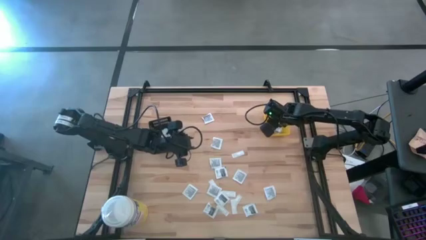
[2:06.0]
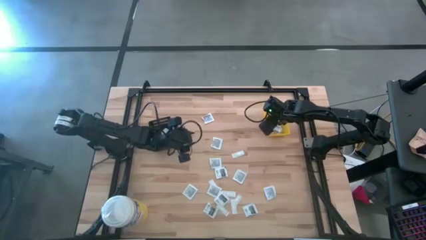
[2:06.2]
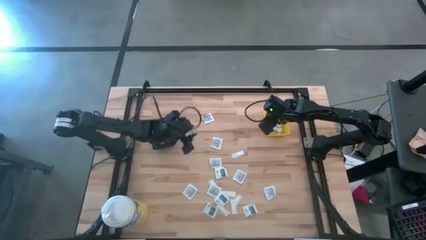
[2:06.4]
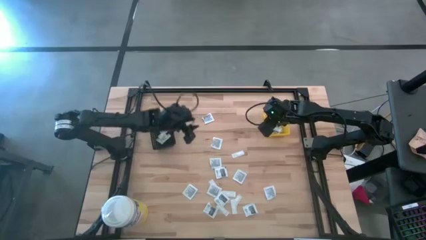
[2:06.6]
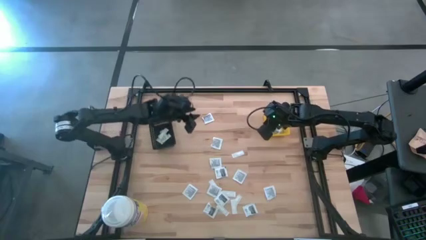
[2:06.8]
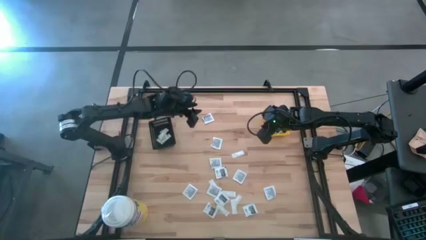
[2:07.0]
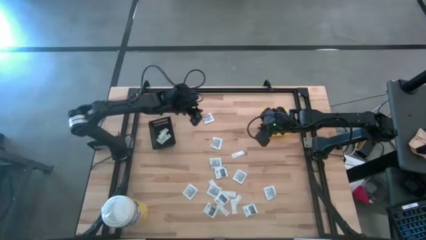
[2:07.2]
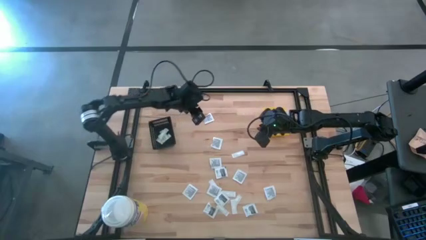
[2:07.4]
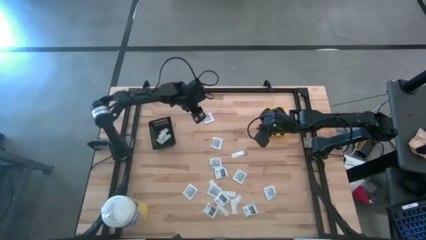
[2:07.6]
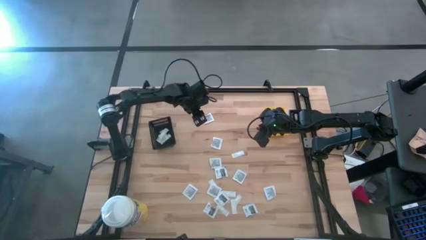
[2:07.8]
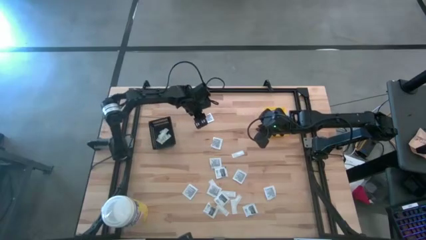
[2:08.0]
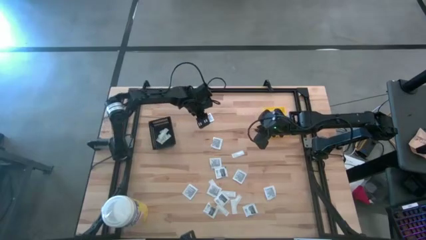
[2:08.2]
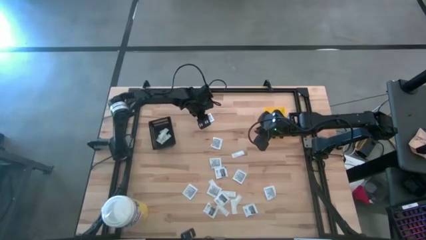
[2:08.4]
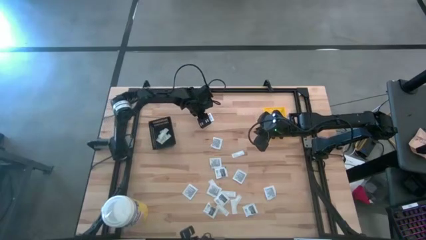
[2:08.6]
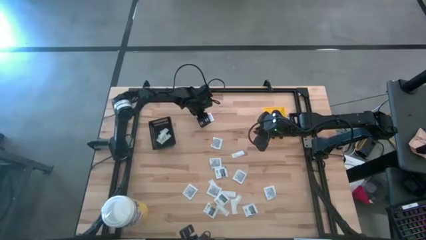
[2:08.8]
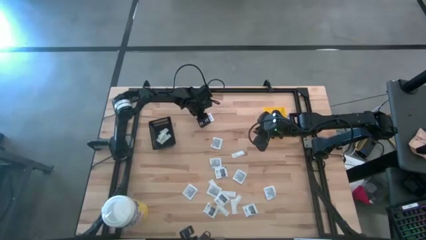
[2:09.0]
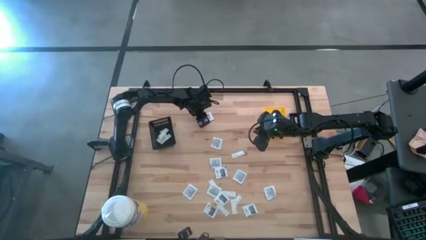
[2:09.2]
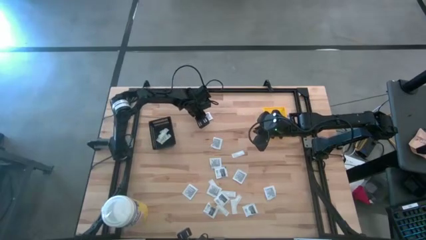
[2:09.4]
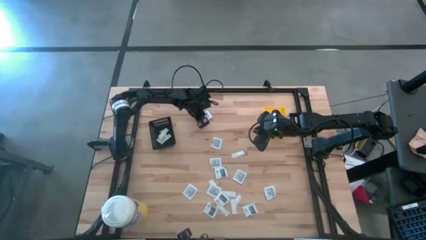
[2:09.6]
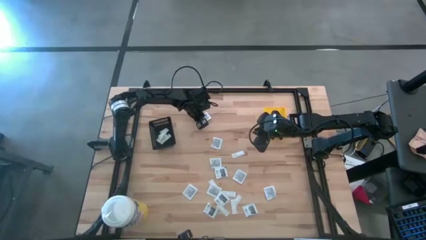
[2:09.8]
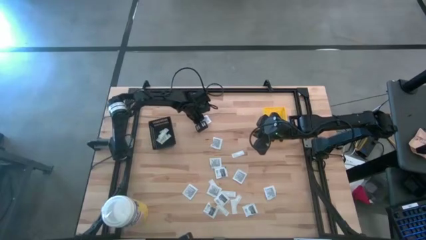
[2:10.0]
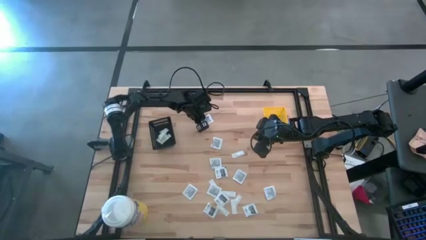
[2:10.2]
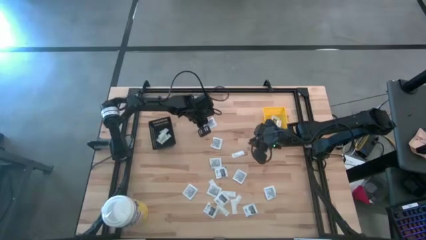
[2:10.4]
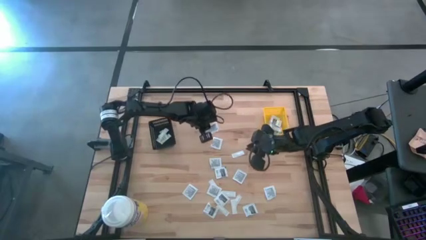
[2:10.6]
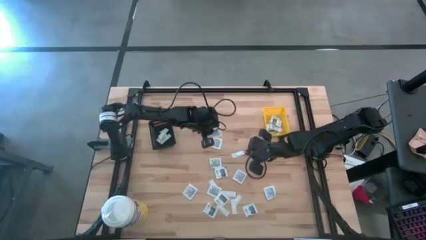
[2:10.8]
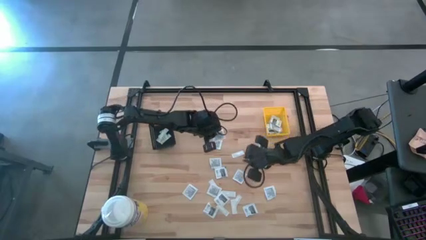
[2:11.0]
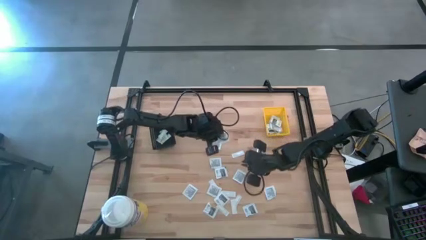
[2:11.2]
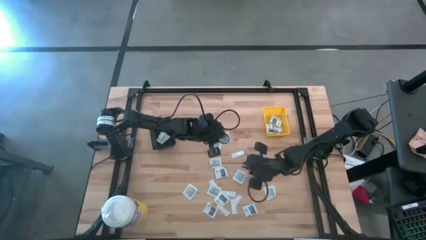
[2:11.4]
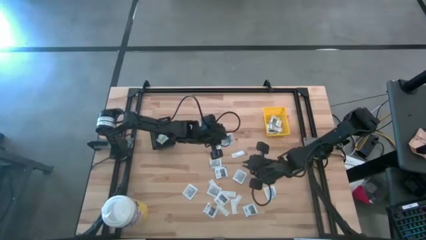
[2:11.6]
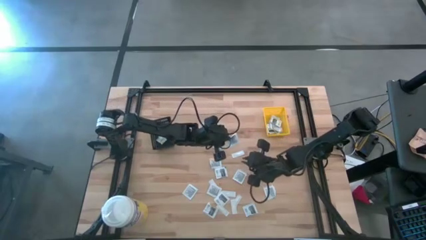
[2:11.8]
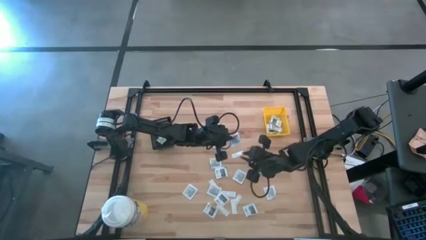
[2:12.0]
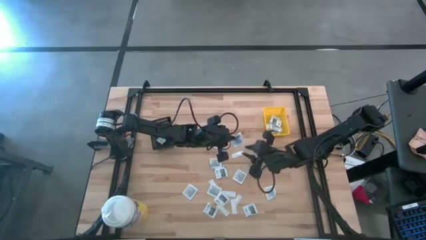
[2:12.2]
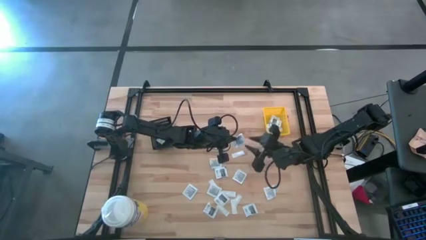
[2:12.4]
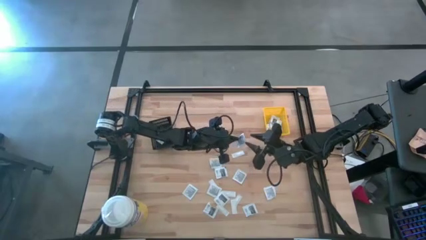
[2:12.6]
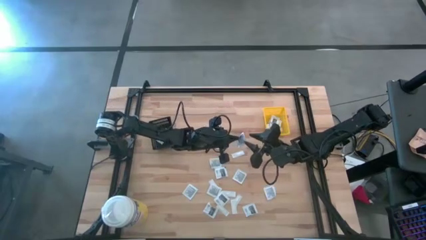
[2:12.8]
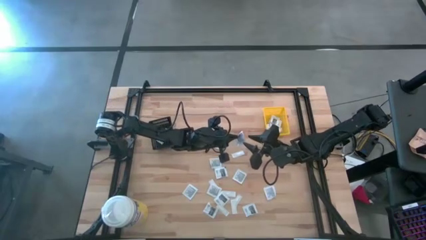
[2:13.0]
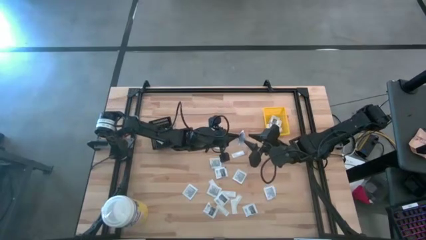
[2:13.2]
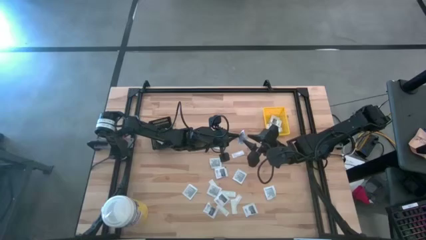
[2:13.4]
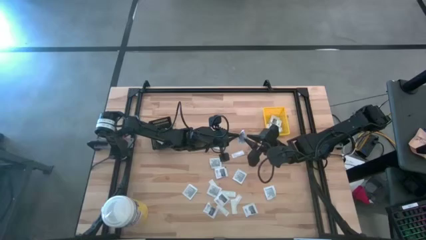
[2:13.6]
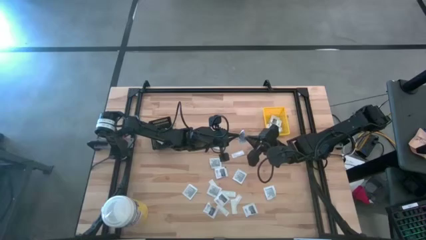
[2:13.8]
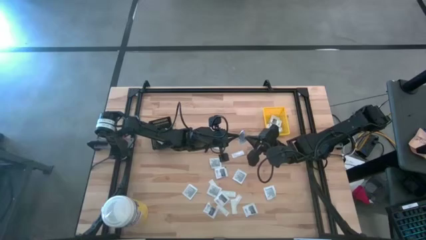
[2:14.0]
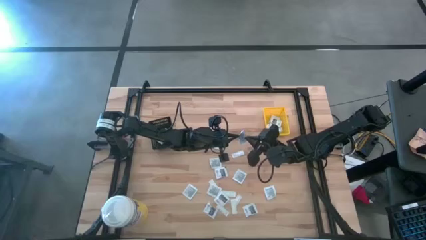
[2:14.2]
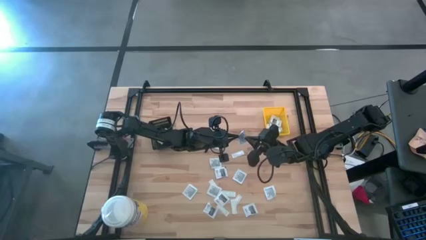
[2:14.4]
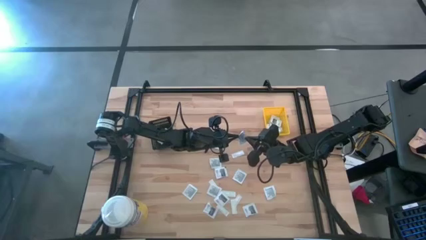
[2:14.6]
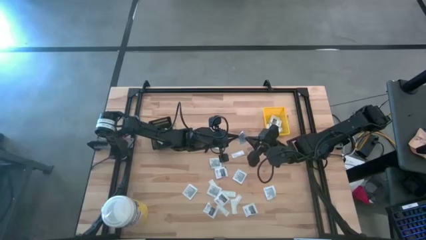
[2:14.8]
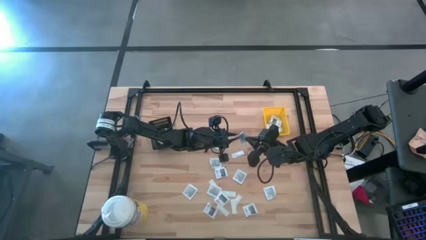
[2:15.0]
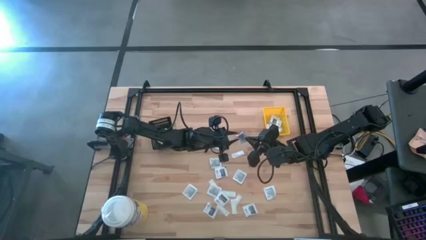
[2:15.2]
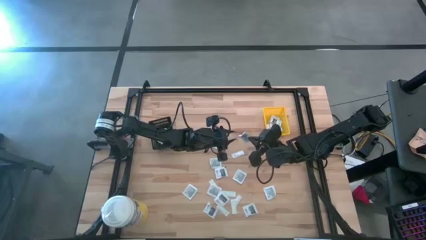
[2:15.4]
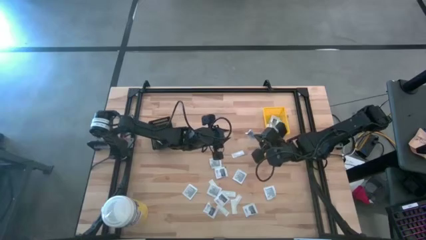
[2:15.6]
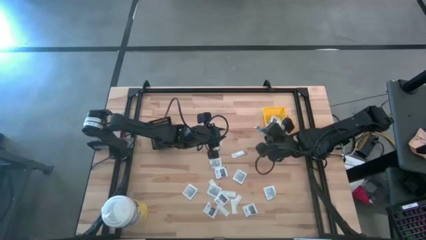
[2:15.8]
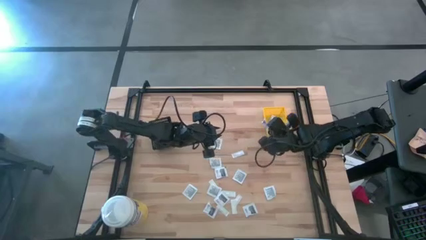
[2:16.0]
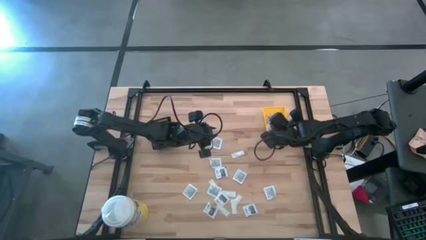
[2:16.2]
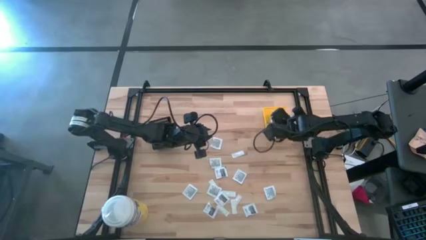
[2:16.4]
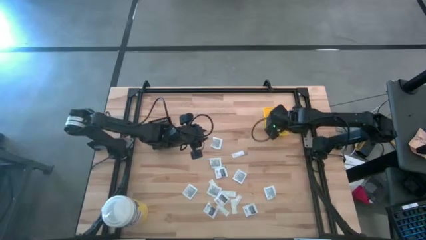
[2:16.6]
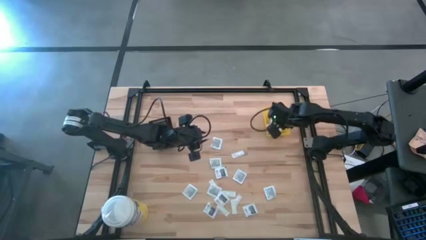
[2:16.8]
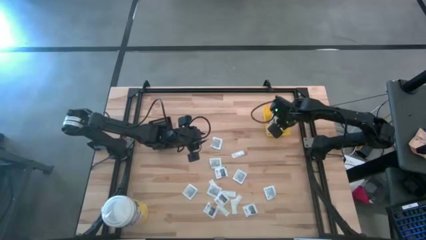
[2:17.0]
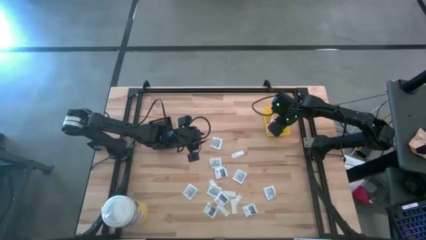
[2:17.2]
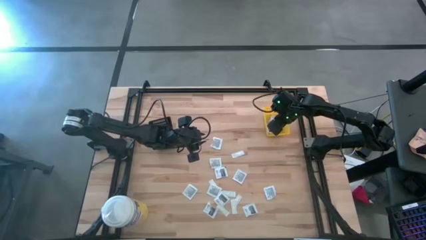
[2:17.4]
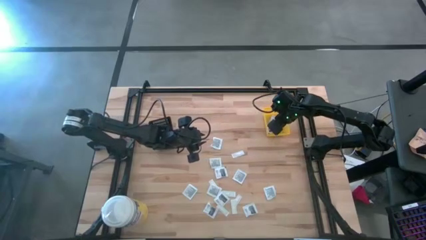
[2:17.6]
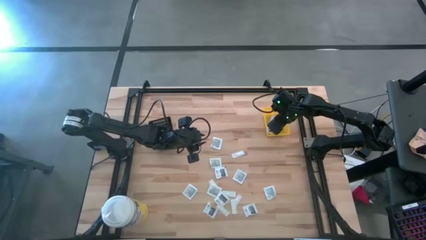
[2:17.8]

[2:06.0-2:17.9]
Task: Pick & Place First Aid Supplies
Put the black pad into the yellow bin

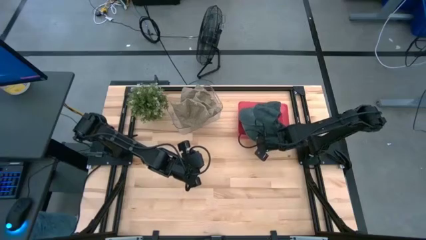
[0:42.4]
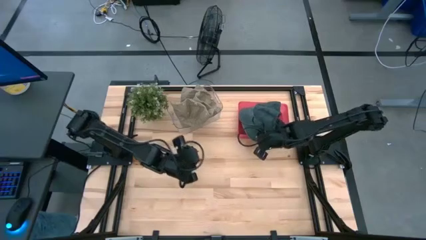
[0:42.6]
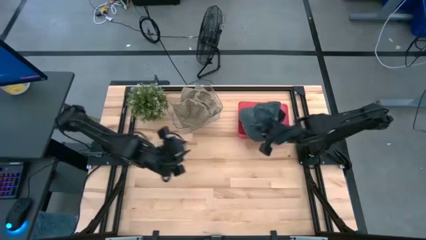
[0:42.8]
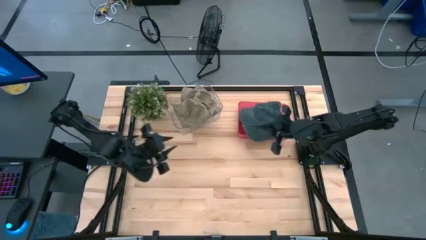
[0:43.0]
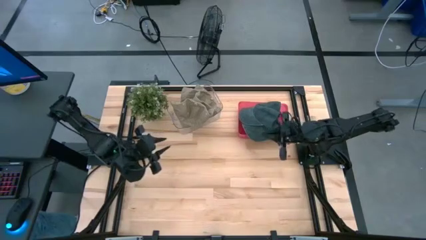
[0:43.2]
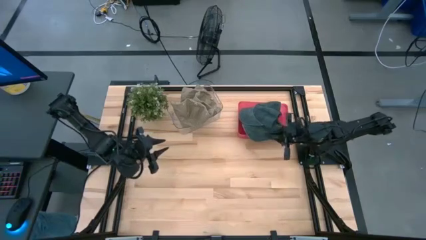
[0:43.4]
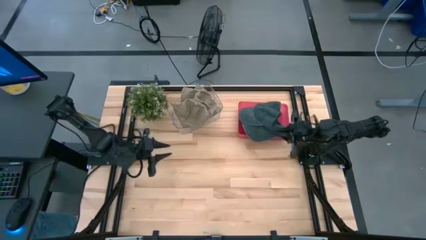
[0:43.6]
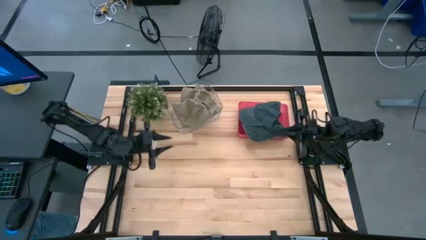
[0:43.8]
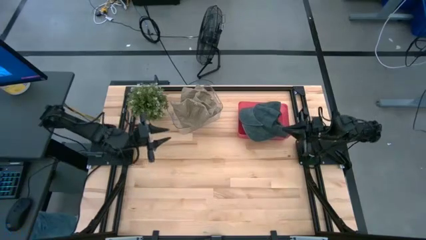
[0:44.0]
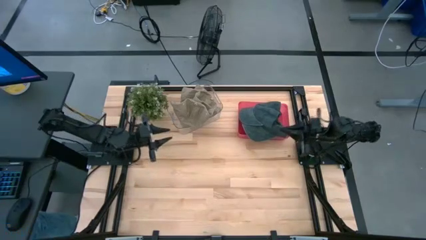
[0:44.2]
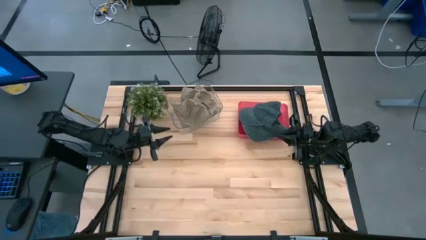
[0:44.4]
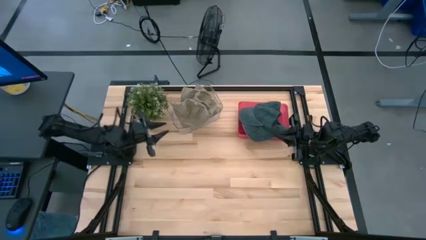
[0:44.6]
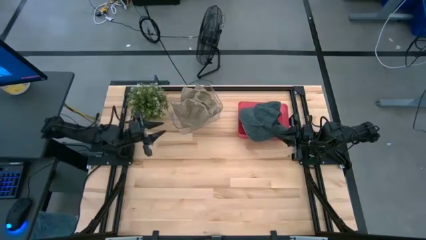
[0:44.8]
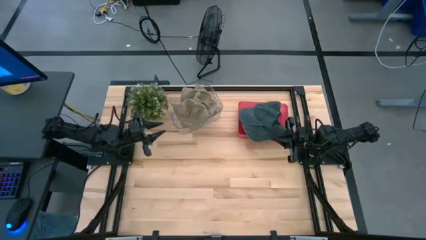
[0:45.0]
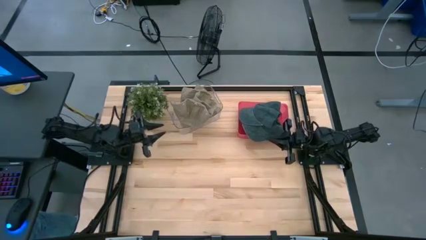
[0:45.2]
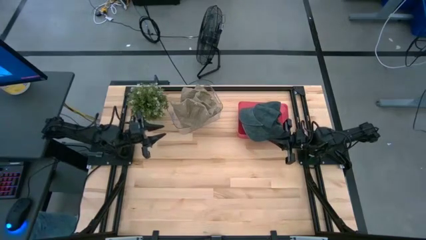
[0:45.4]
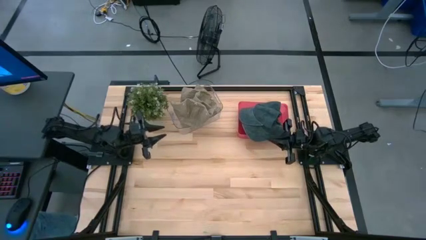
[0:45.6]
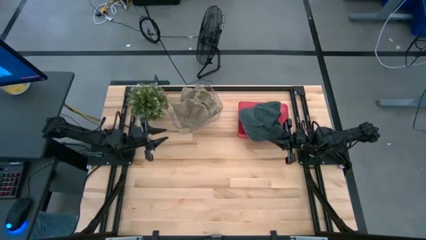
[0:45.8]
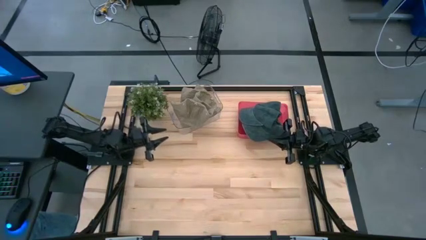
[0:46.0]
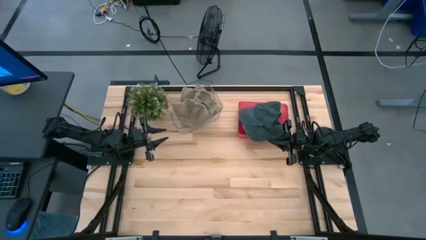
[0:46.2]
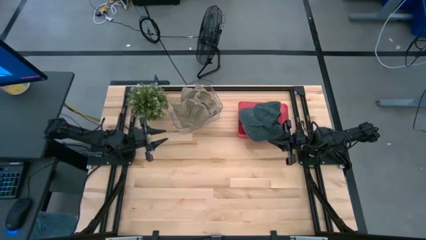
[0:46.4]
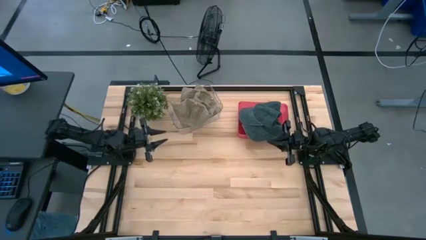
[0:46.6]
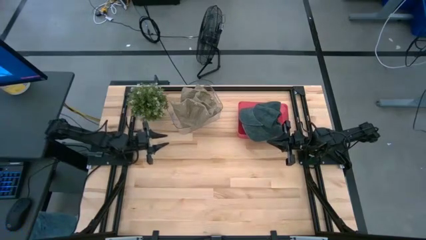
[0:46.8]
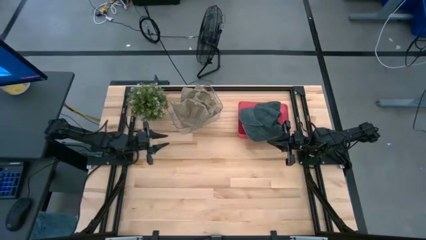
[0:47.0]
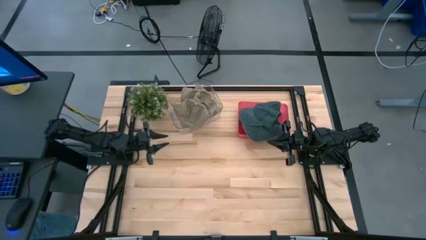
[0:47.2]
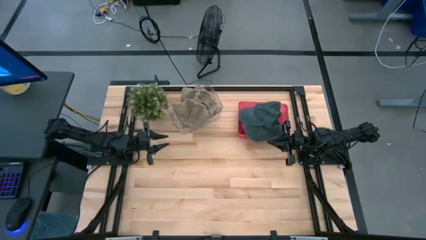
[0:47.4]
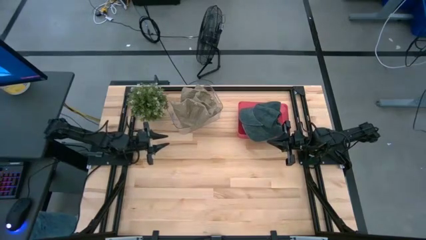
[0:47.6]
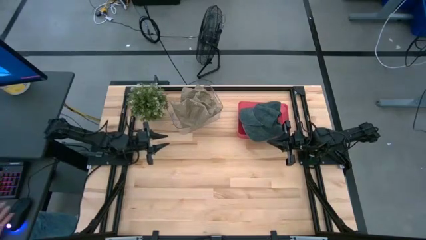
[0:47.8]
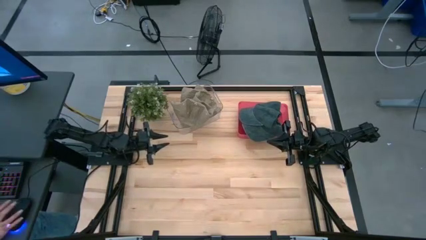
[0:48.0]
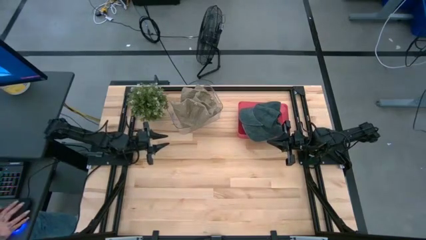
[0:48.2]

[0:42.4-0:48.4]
Task: Pick & Place hat
Return to Home Position
